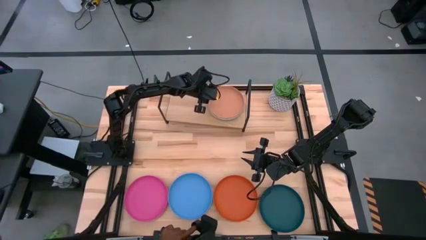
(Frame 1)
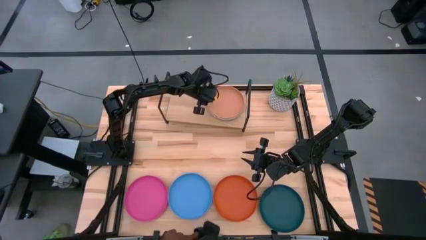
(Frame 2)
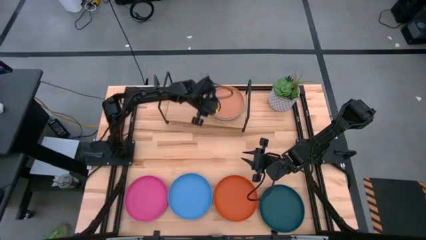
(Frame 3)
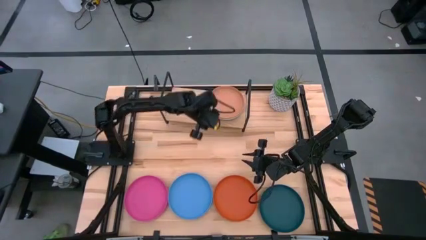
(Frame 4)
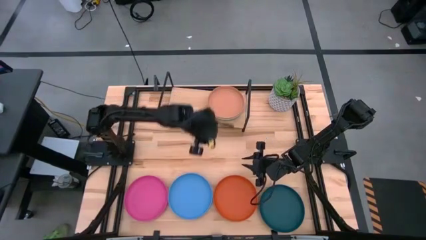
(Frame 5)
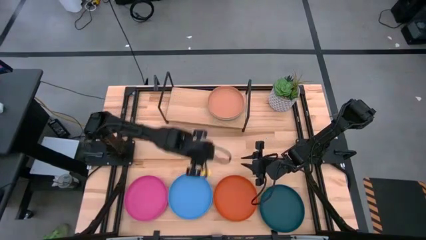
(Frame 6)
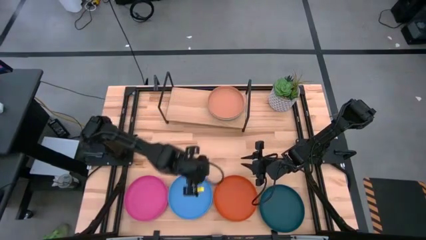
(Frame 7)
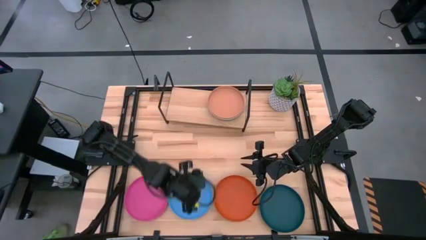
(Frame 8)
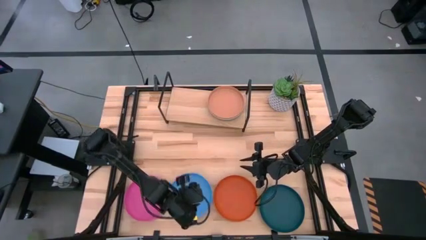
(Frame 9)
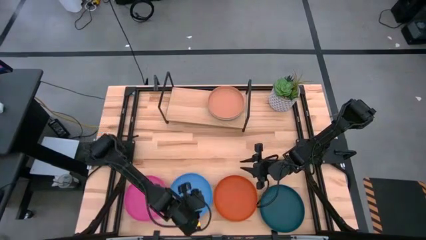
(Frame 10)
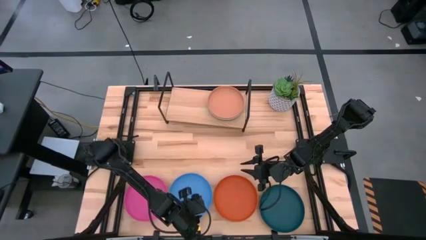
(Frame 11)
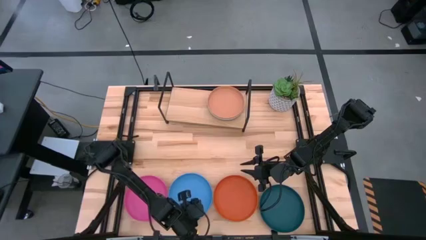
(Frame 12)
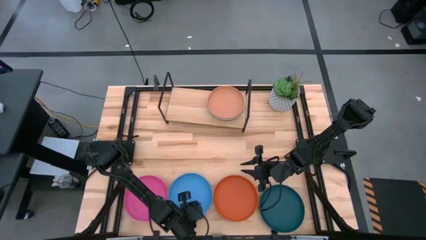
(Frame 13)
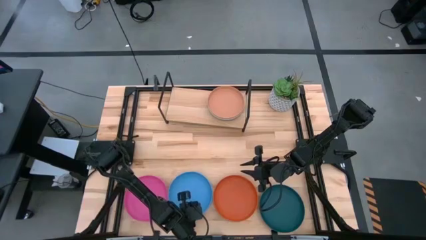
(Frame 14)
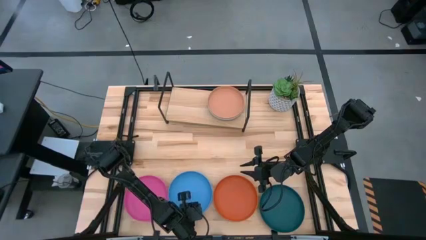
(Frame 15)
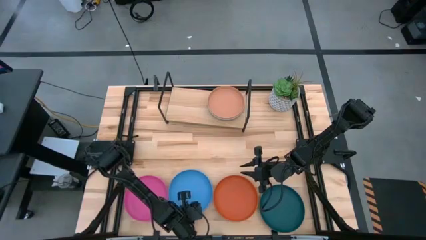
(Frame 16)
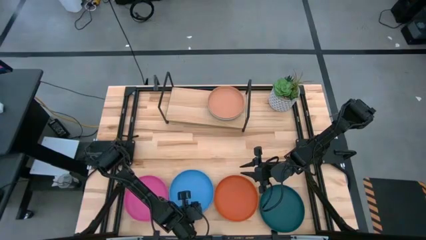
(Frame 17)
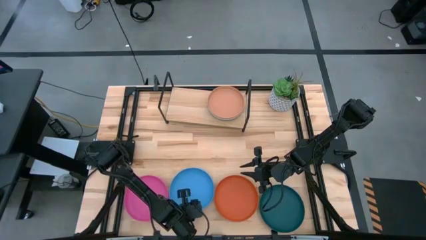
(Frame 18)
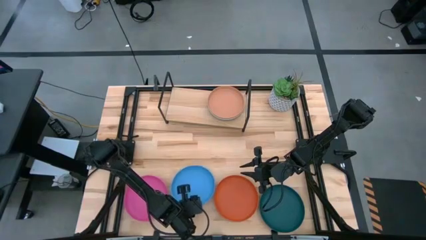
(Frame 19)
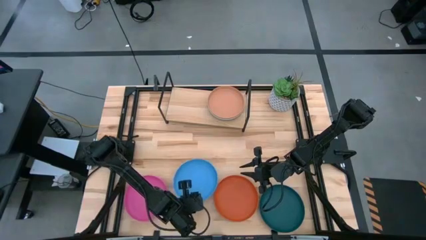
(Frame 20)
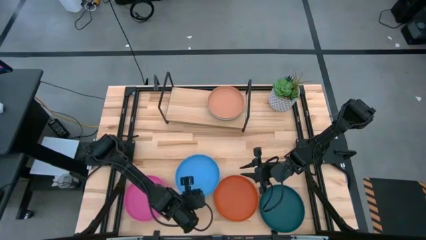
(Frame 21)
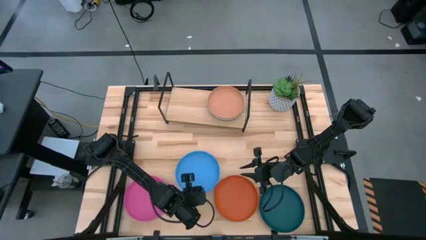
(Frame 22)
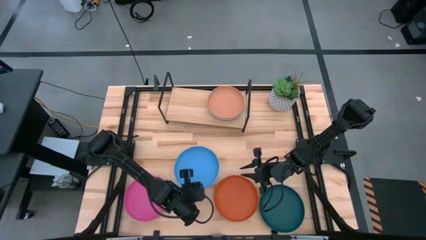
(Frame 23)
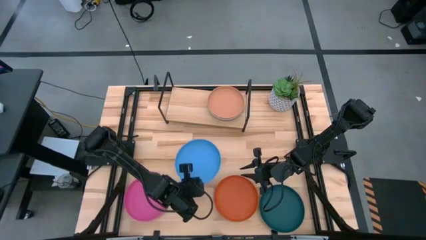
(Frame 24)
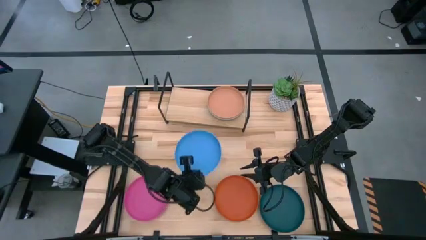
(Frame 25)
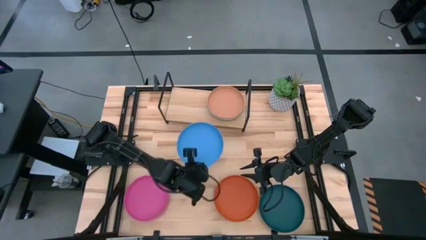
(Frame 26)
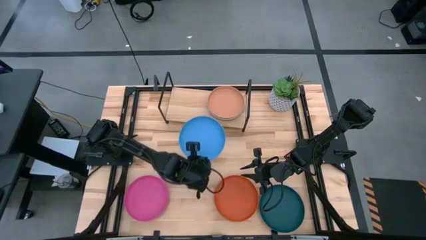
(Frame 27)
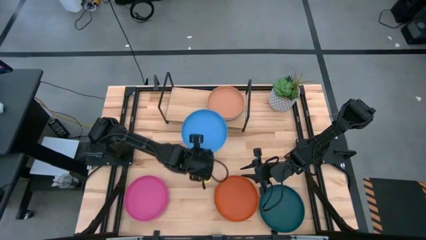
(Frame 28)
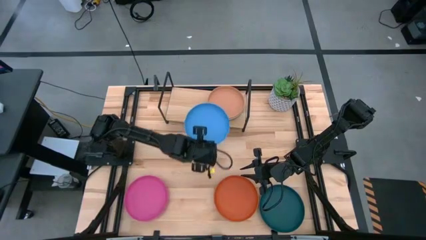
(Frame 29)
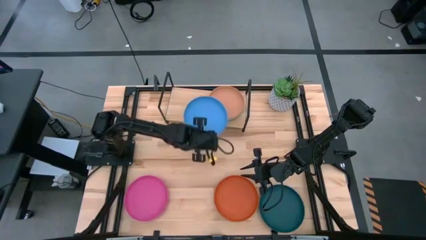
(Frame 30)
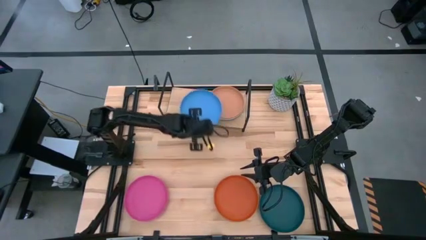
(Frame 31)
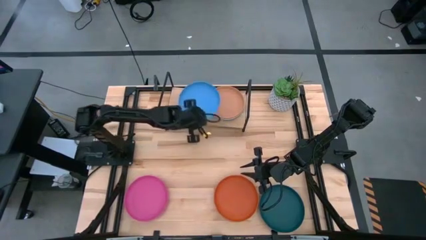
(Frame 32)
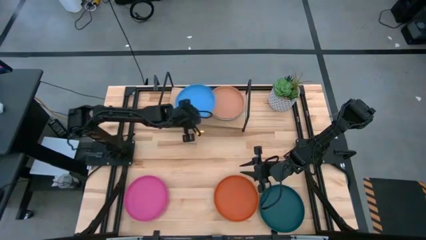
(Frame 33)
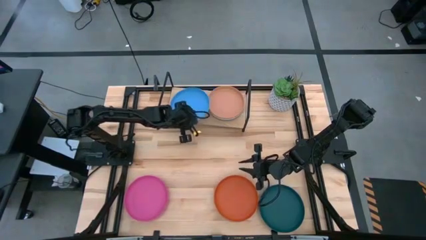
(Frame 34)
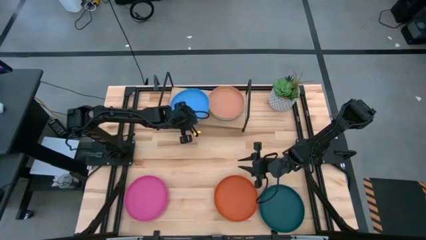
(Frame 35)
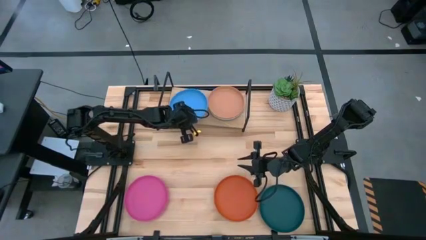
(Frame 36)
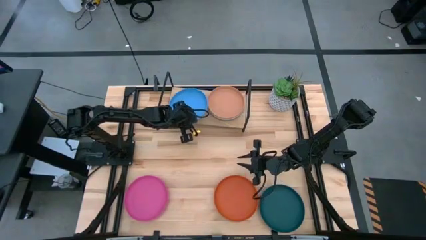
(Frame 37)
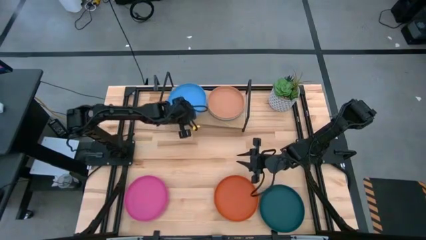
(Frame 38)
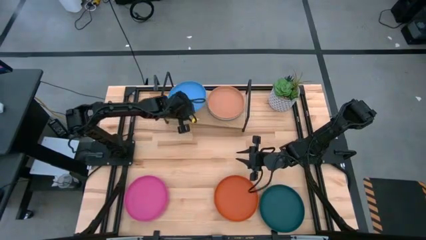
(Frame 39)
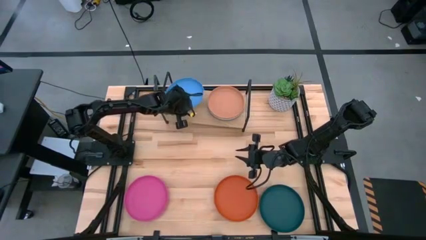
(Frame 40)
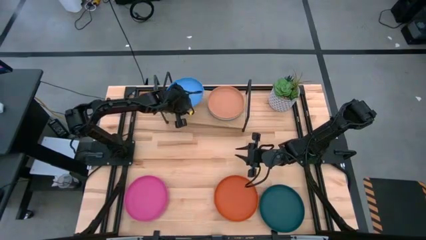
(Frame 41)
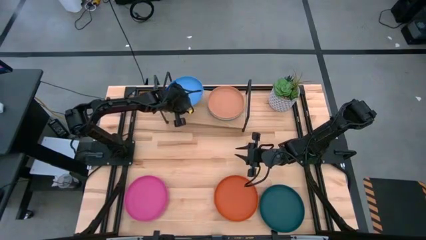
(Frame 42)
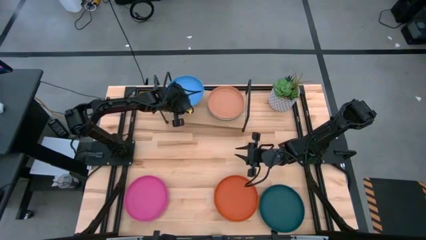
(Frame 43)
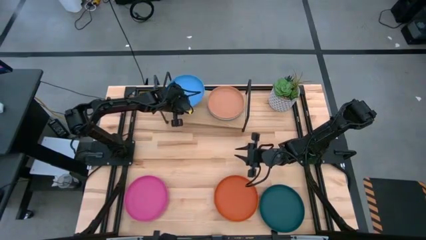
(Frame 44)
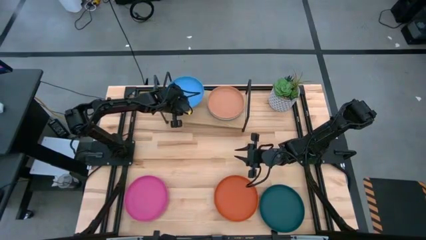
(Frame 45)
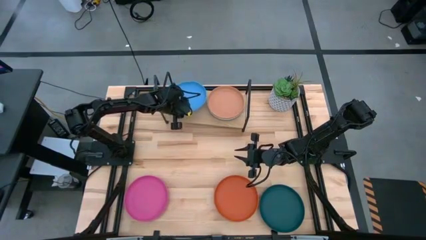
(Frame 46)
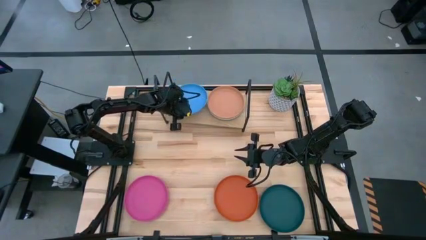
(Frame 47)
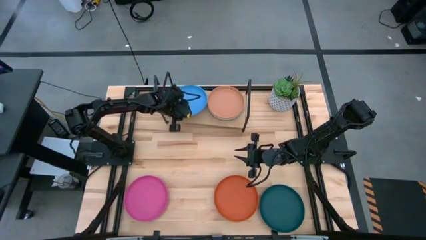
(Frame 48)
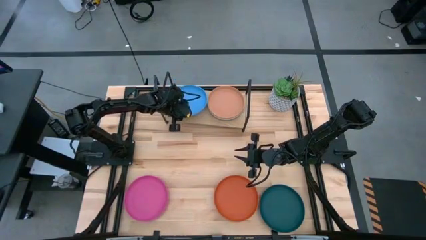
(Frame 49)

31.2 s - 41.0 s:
Task: Place and stack plates onto a shelf
Put the blue plate on the shelf

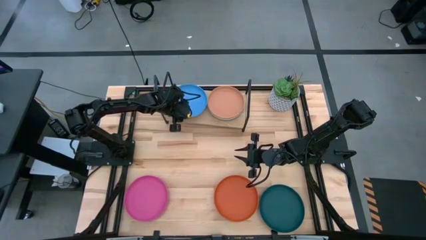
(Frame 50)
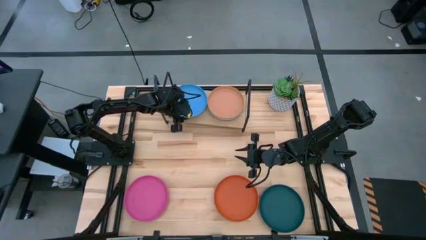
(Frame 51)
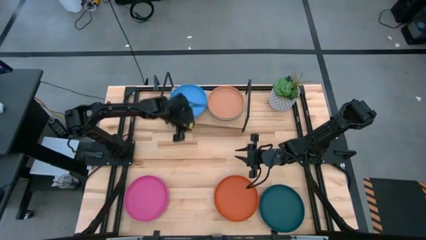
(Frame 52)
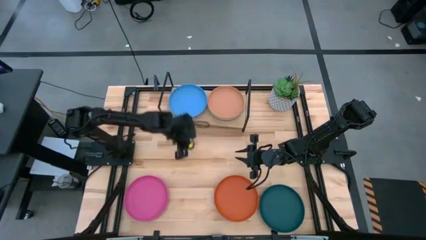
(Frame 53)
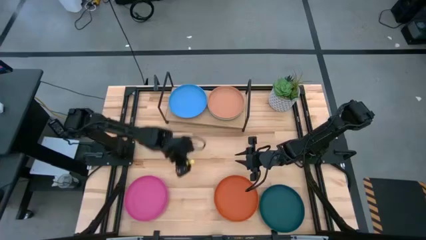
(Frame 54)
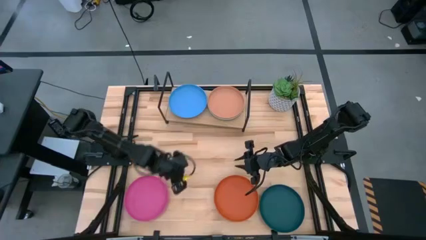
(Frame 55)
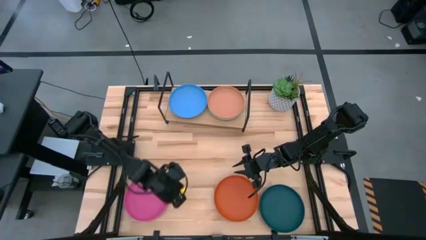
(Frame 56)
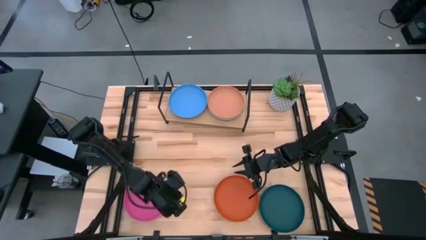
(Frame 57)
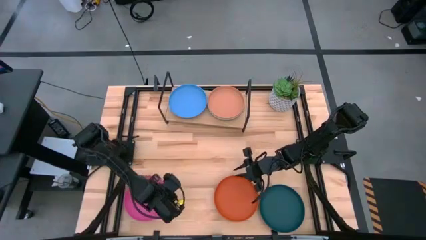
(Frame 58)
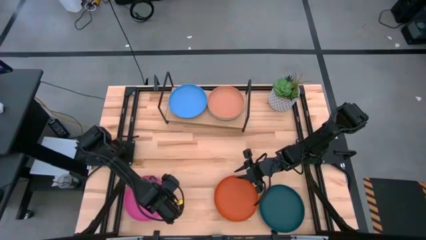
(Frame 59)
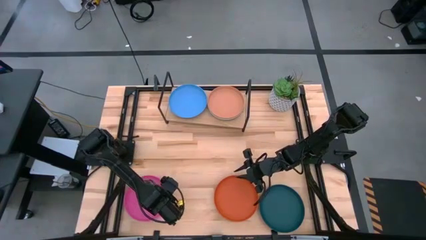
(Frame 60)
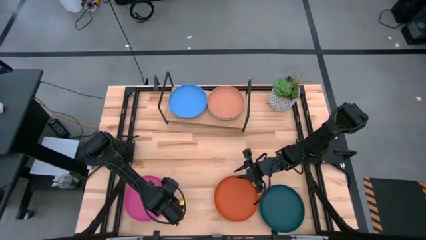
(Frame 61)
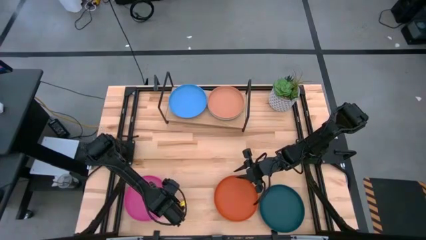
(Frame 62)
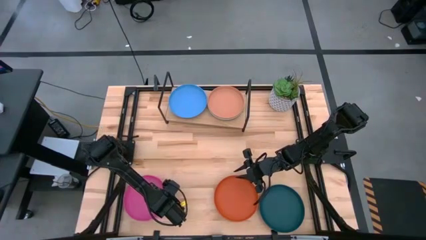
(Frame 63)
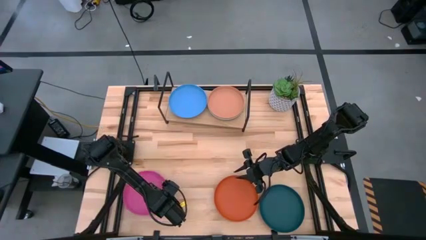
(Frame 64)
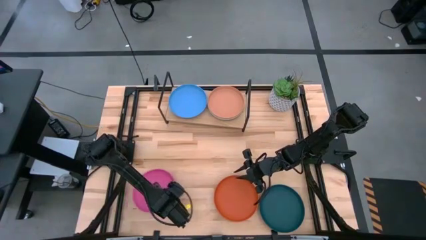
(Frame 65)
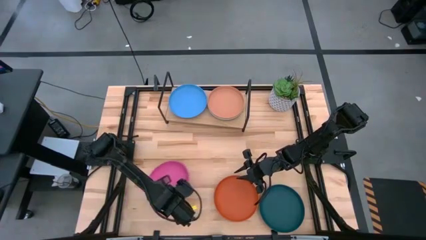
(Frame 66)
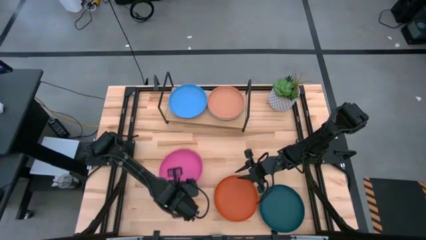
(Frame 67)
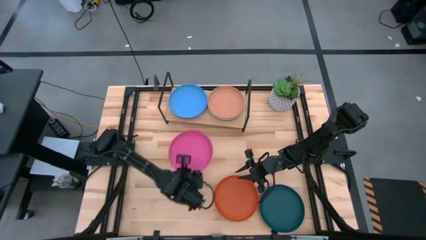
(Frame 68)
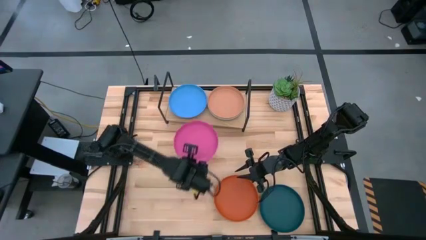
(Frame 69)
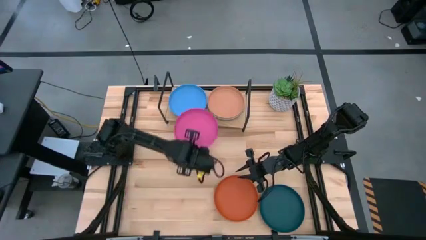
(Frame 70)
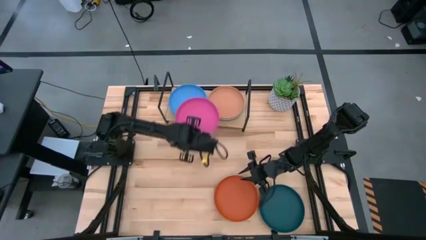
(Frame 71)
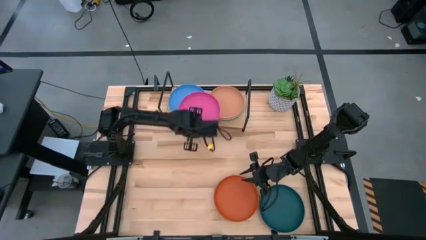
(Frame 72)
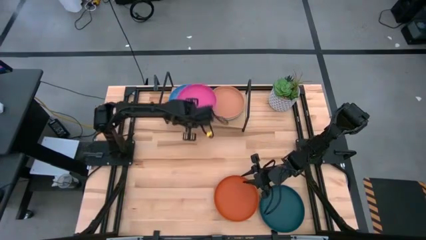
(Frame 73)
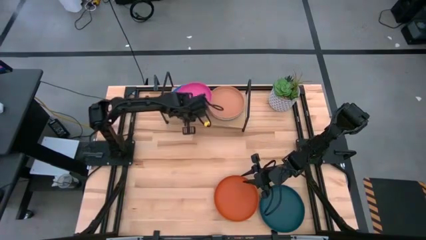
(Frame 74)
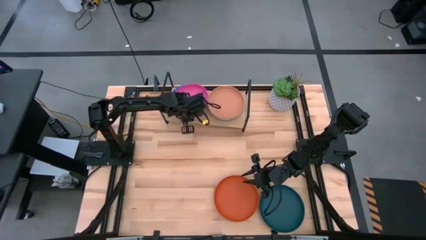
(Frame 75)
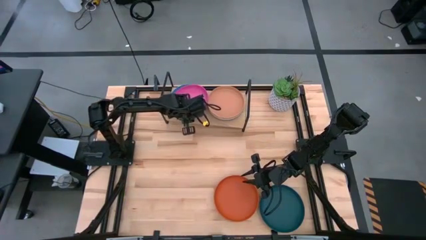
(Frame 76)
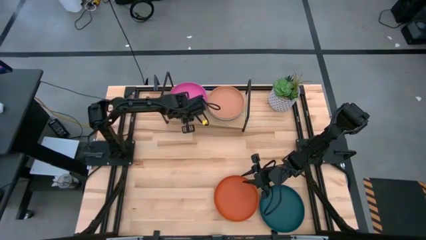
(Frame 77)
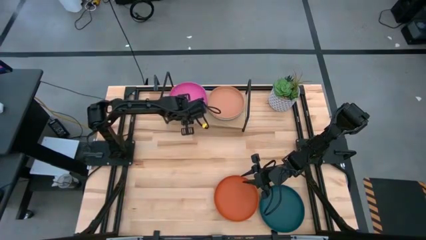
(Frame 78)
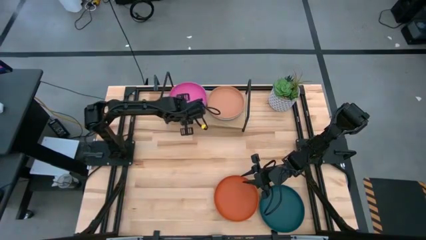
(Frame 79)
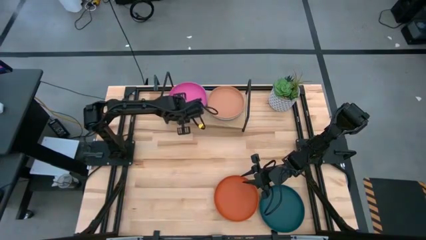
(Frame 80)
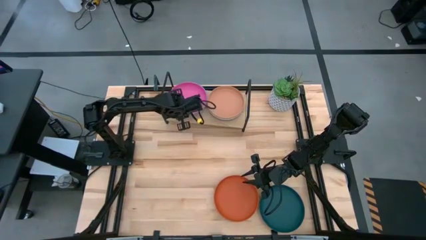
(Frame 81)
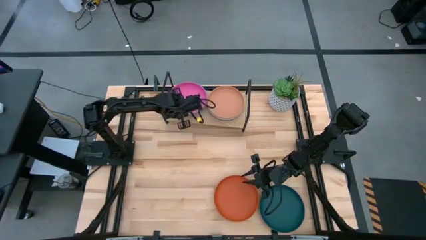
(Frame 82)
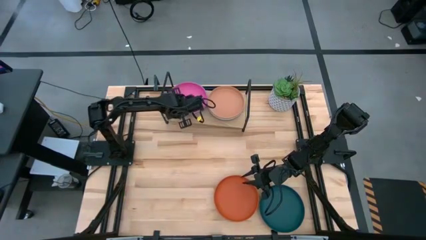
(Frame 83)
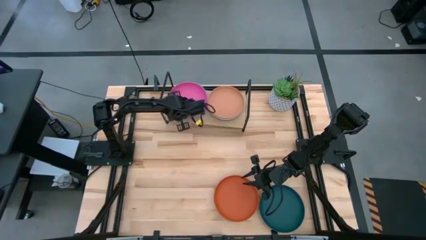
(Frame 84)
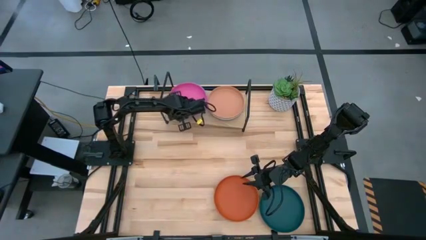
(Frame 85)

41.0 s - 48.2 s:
Stack the pink plate on top of the blue plate on the shelf
